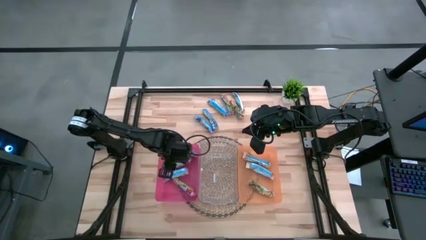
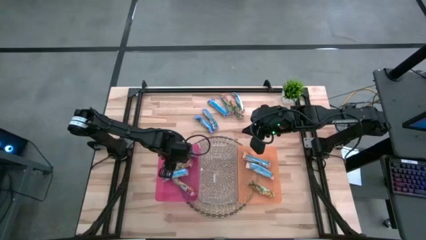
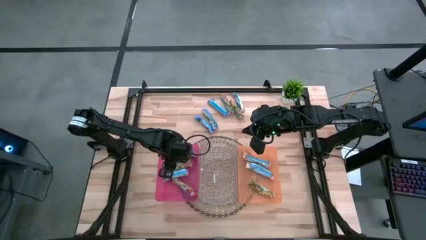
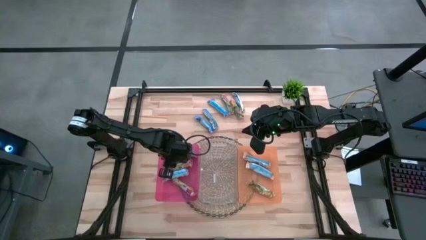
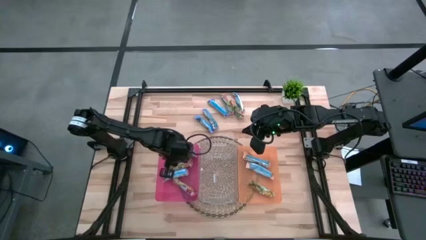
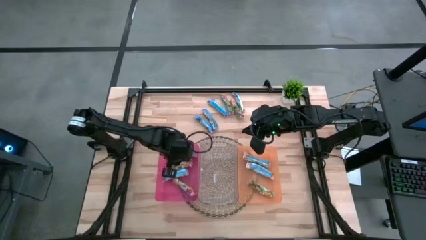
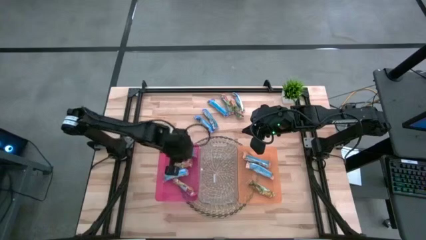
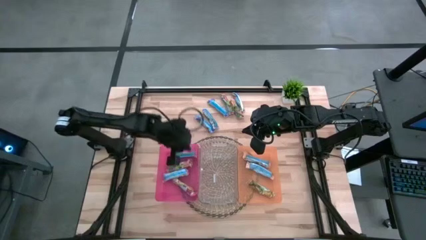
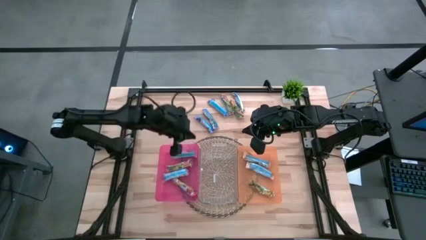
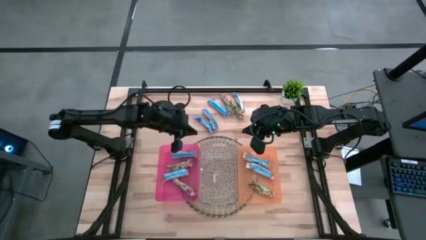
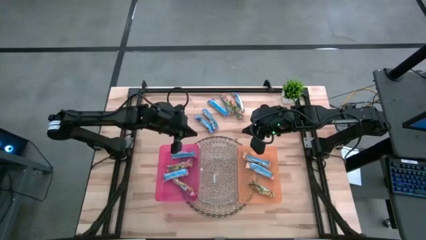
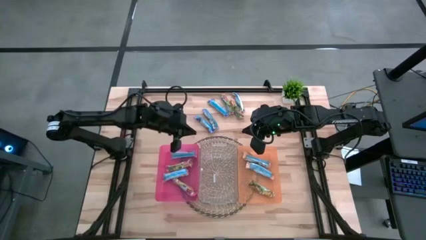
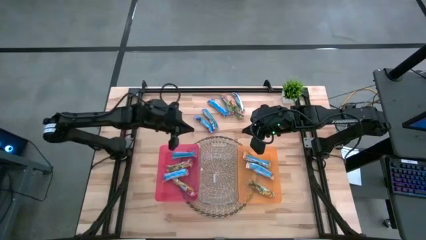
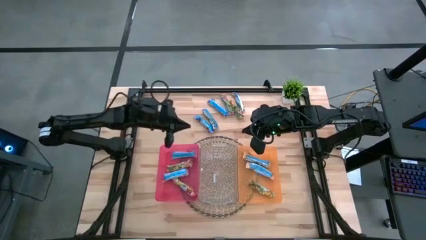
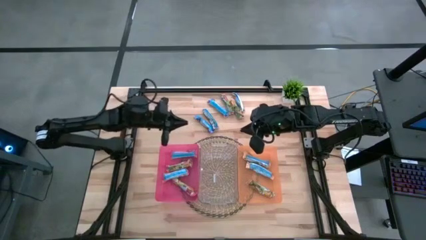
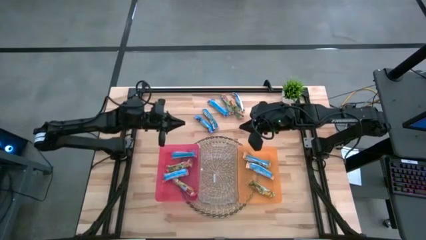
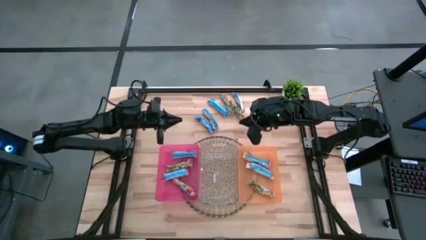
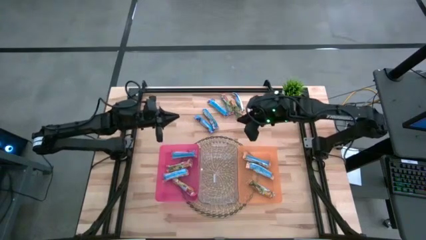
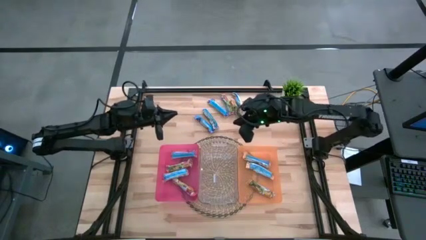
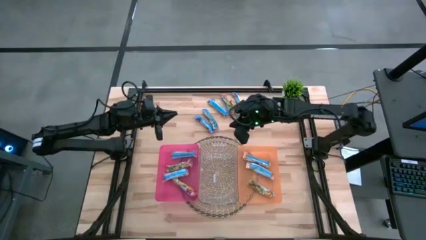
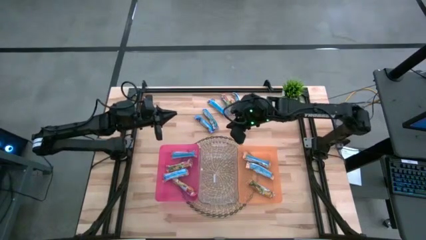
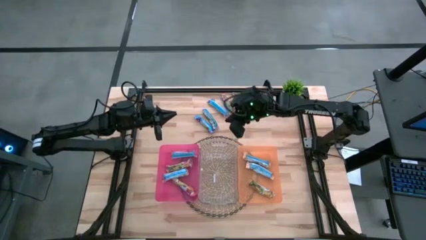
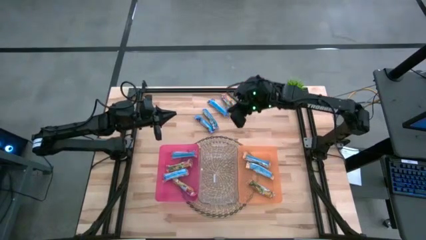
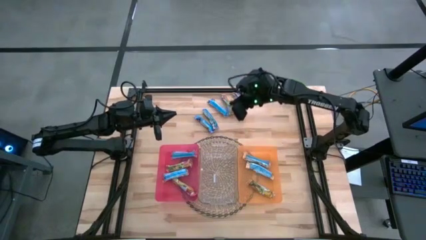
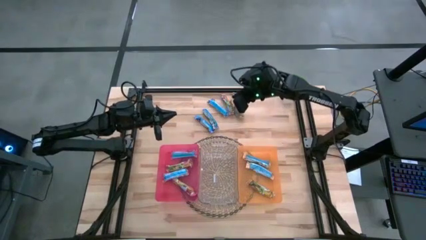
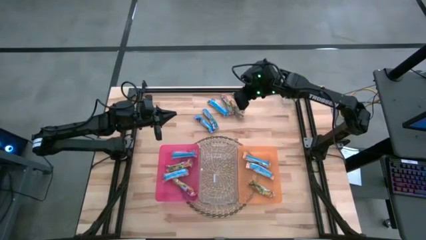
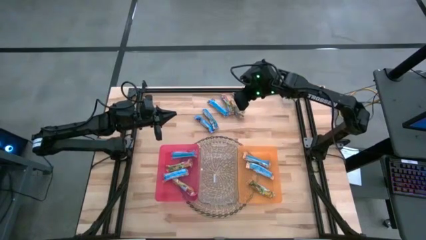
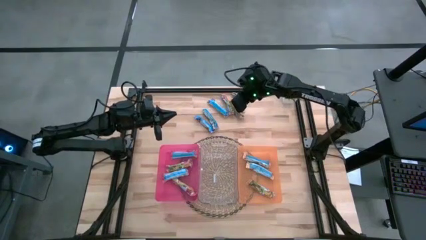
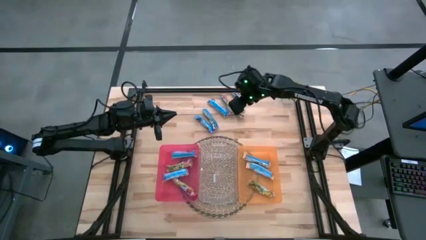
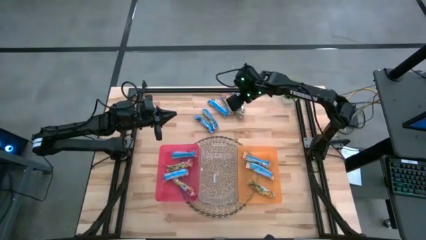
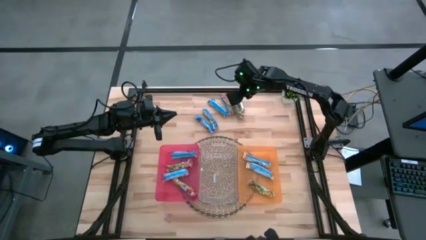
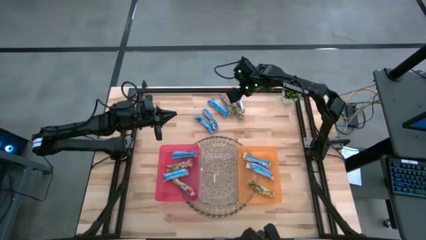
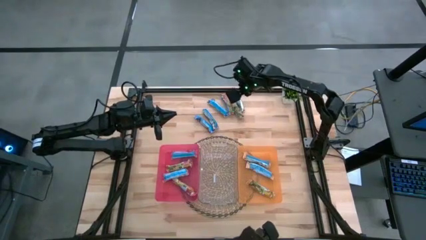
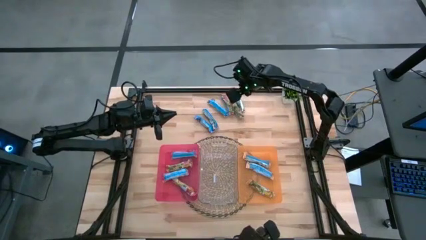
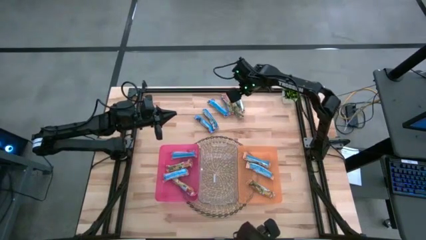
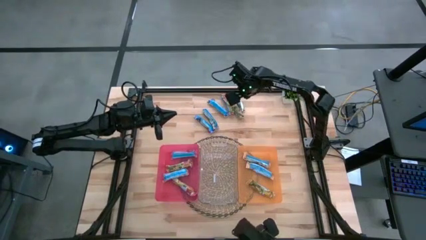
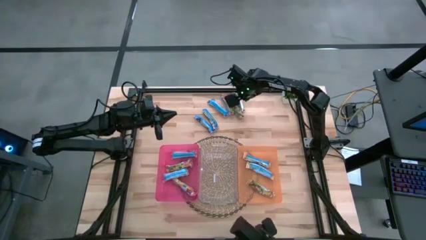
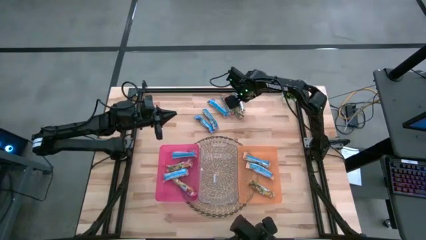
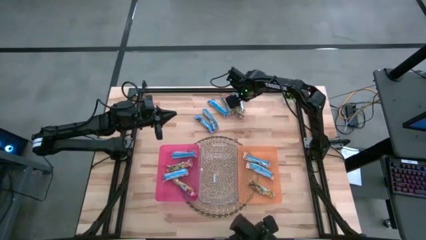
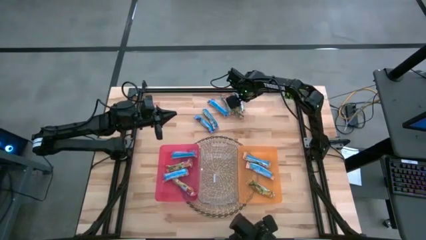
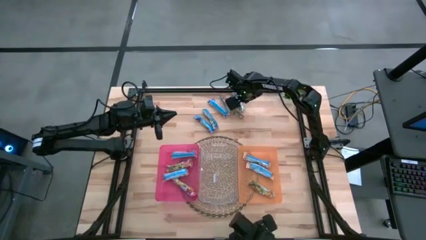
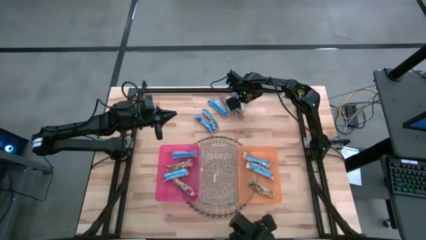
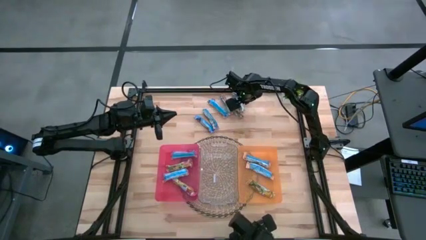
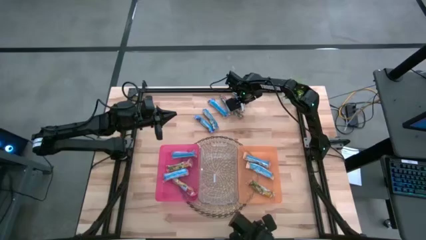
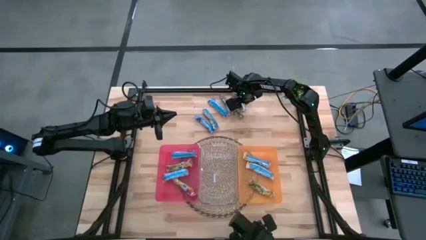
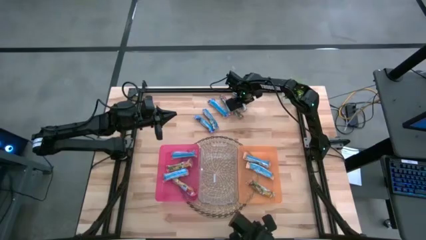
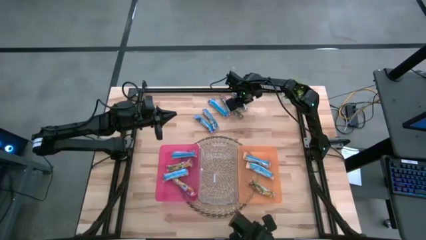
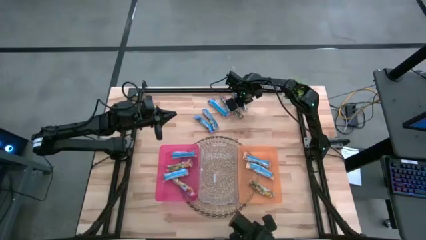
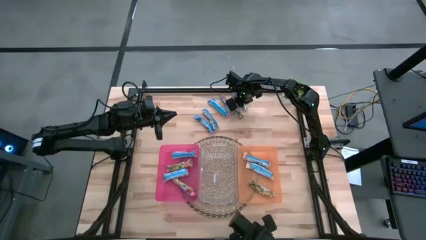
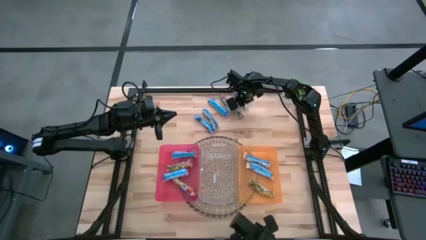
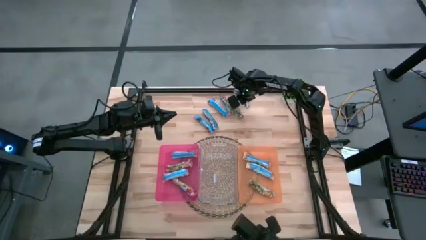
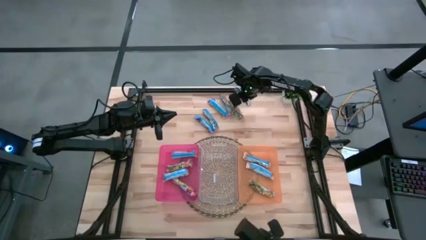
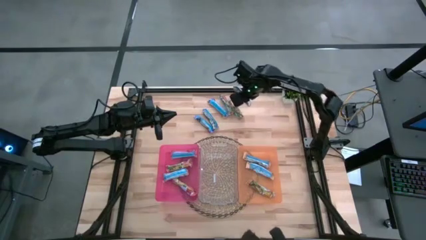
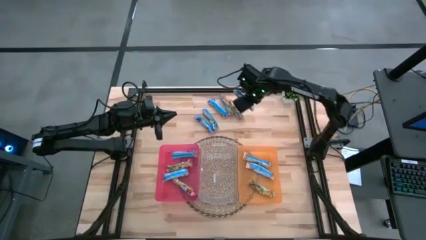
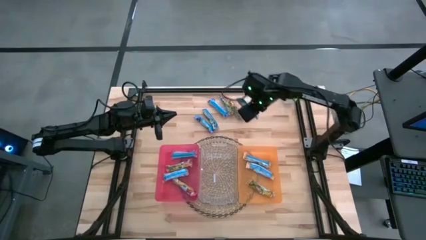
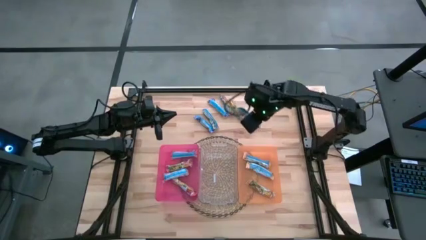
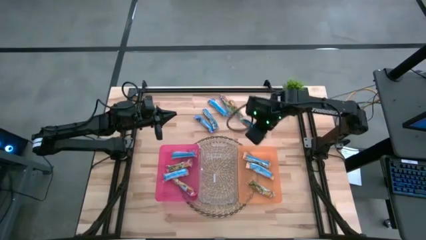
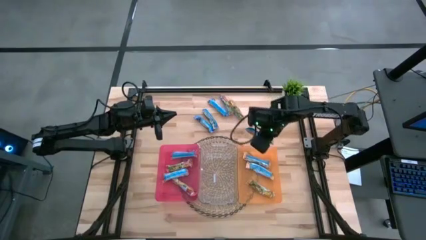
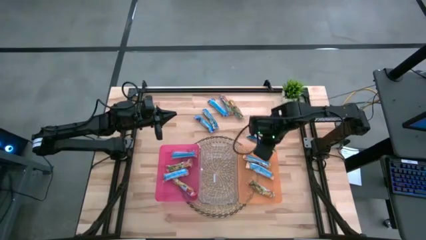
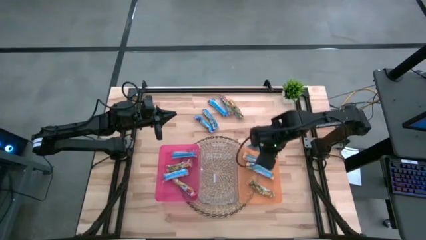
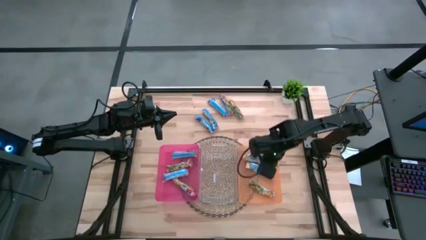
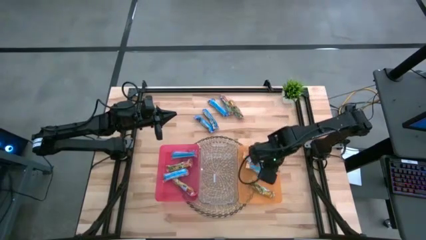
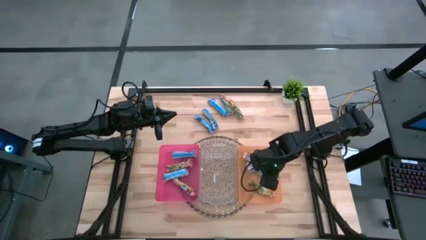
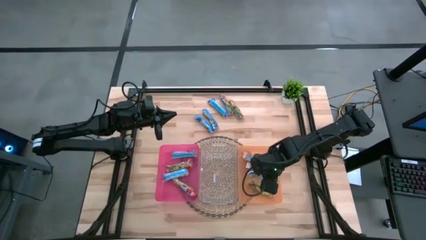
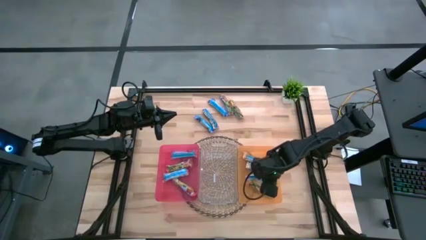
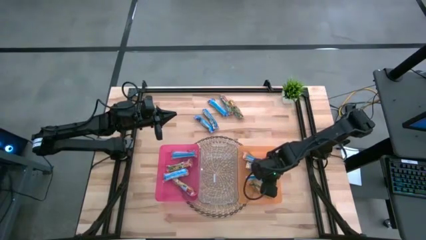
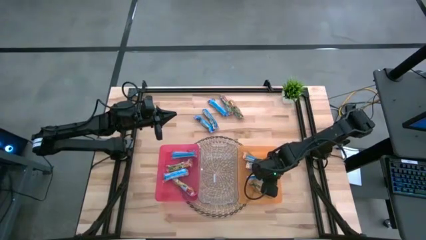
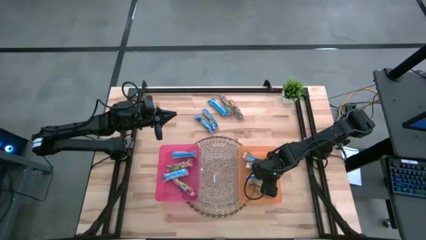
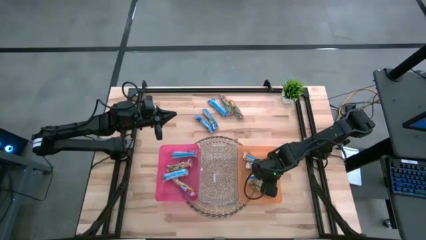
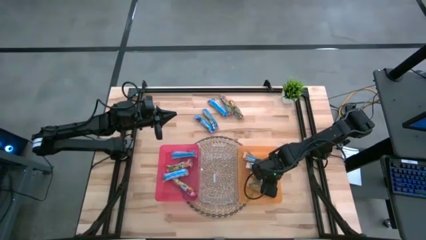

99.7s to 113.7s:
Task: Pick and place Granola Bars by type
Put the yellow granola bar into the orange bin
